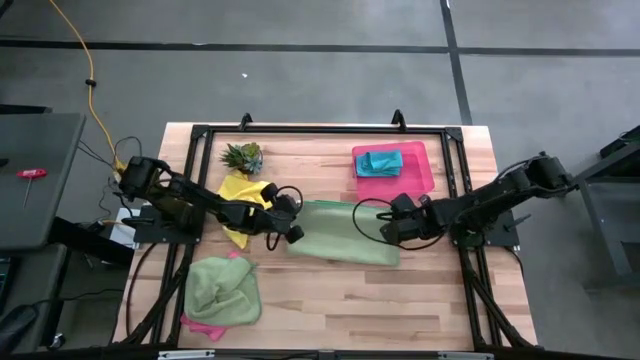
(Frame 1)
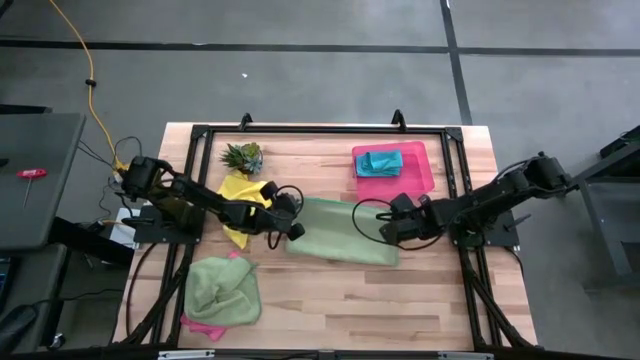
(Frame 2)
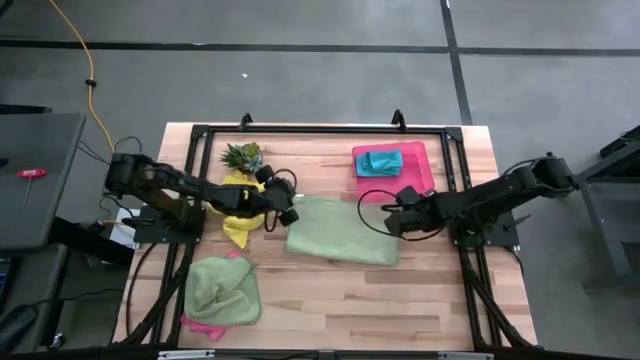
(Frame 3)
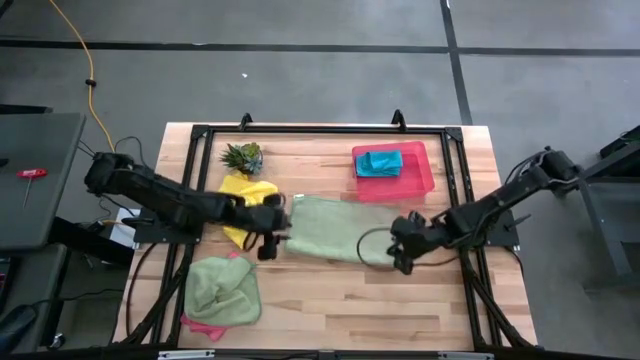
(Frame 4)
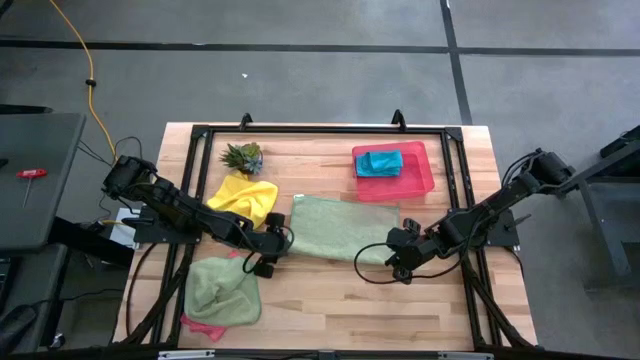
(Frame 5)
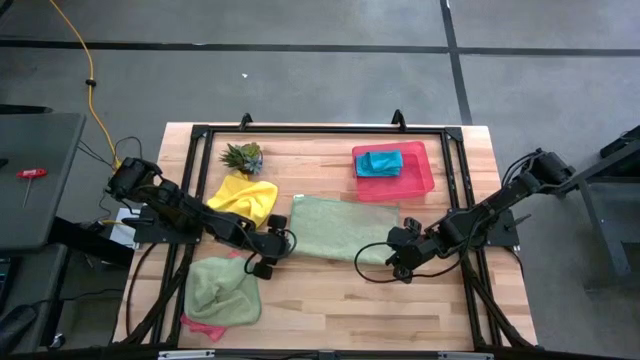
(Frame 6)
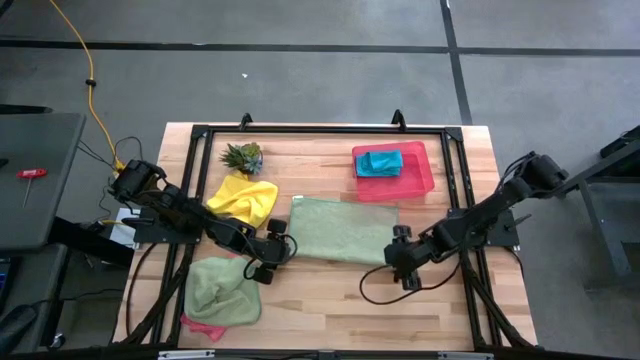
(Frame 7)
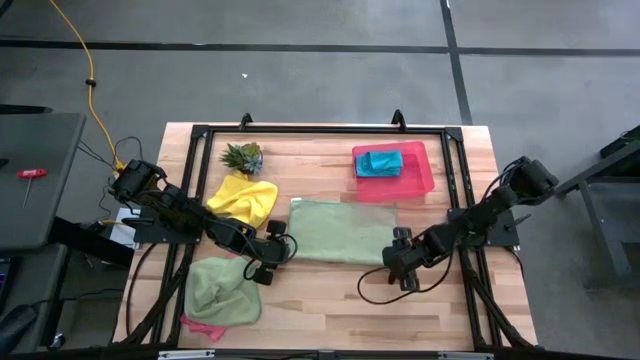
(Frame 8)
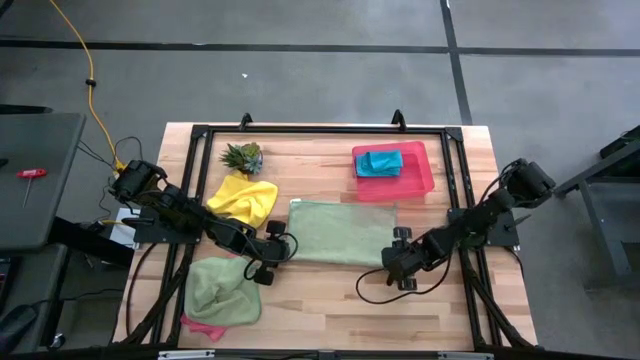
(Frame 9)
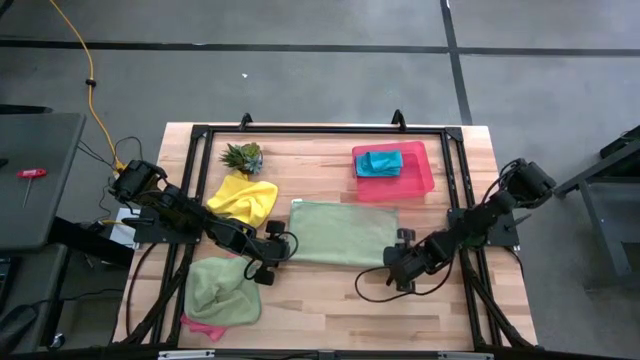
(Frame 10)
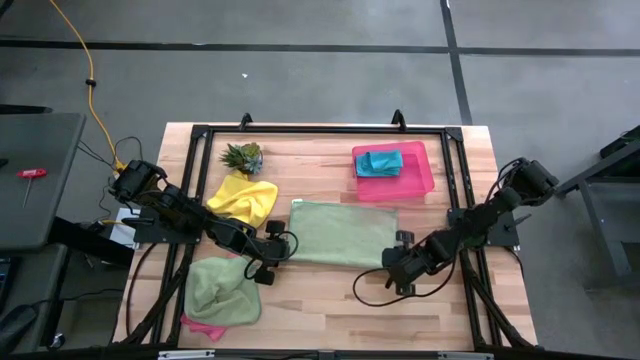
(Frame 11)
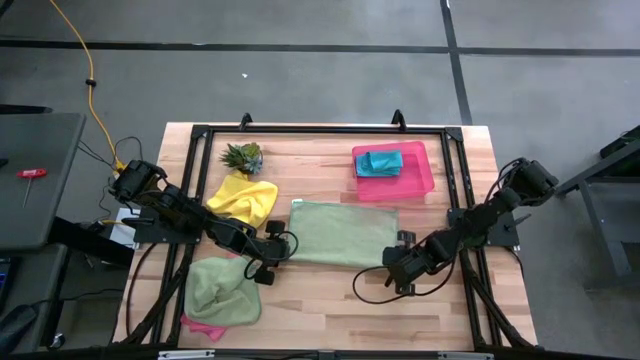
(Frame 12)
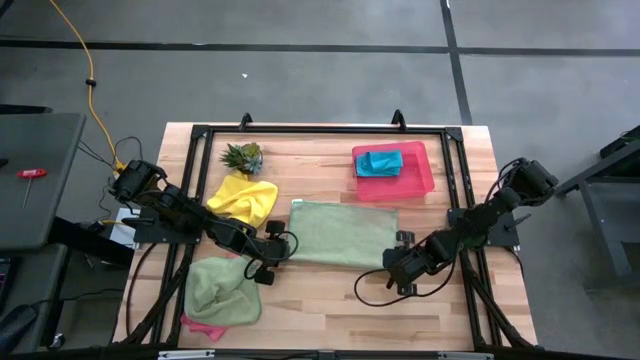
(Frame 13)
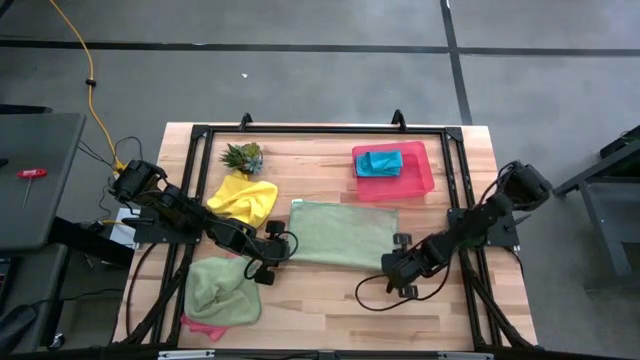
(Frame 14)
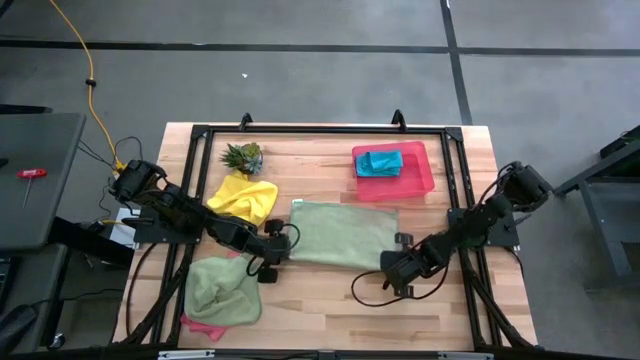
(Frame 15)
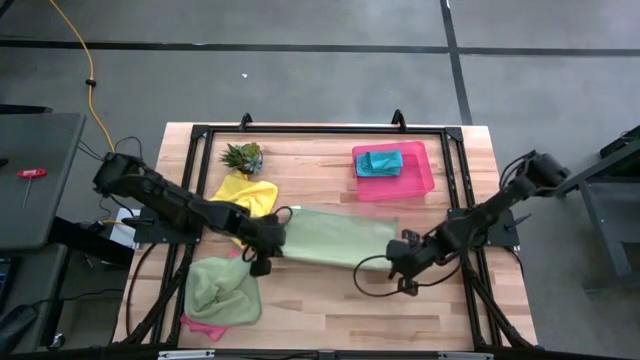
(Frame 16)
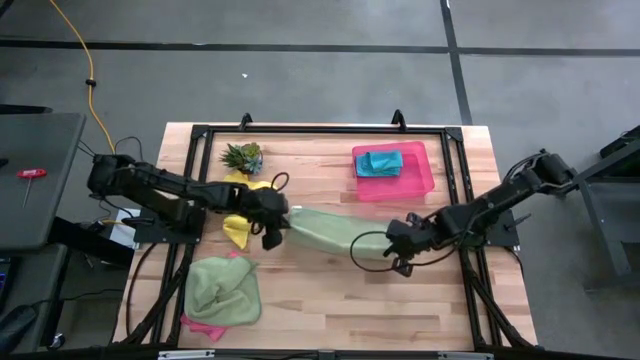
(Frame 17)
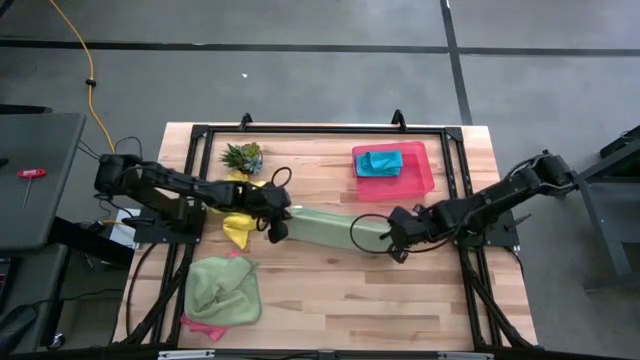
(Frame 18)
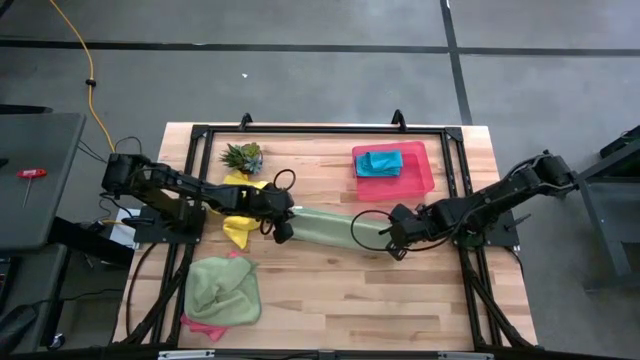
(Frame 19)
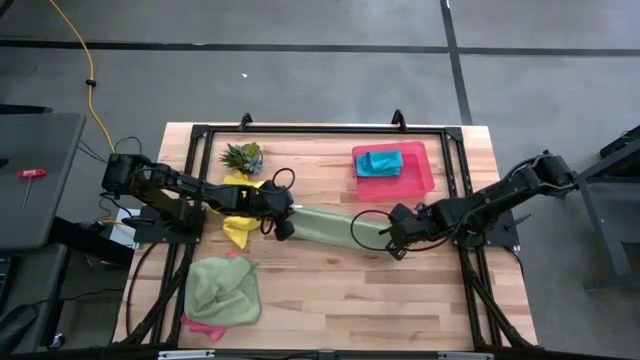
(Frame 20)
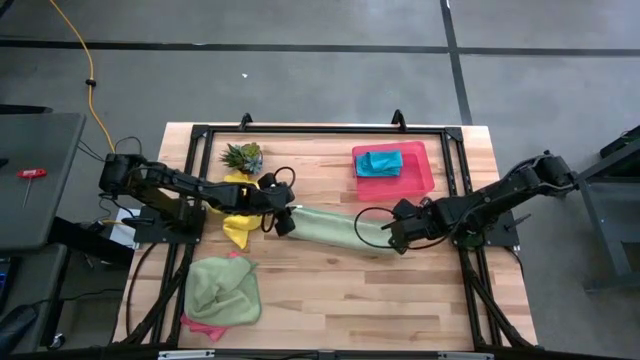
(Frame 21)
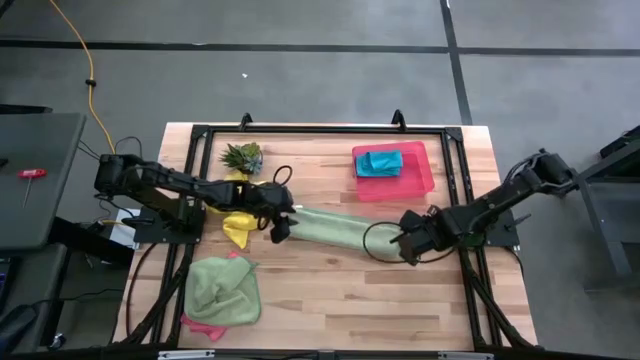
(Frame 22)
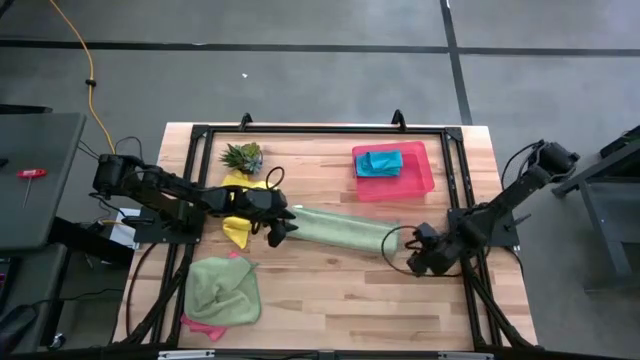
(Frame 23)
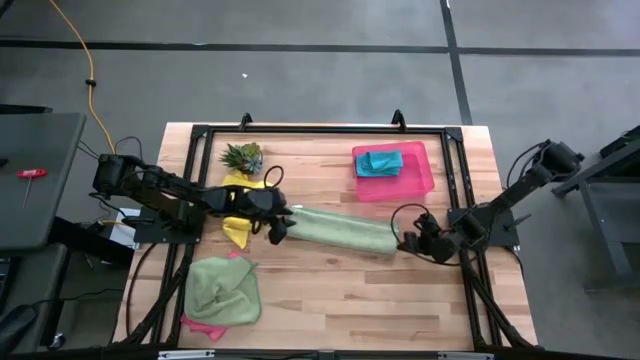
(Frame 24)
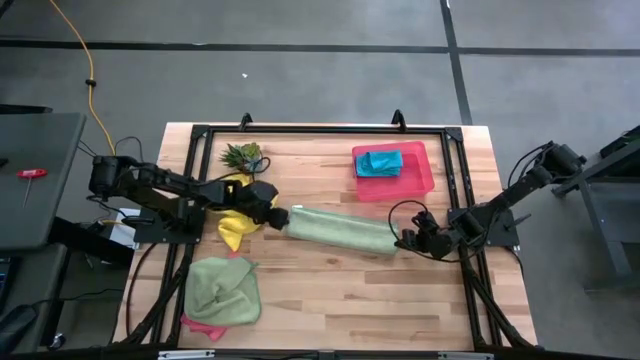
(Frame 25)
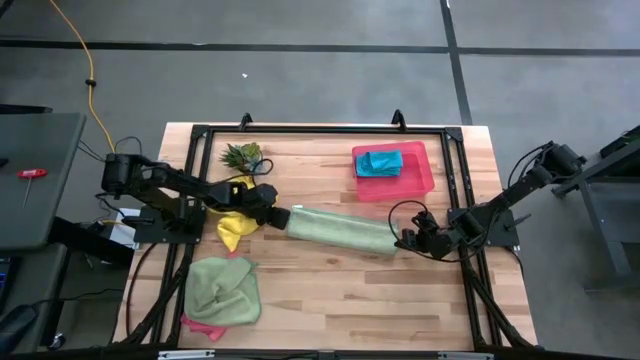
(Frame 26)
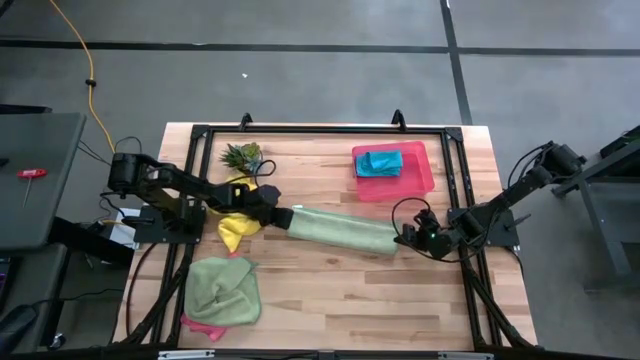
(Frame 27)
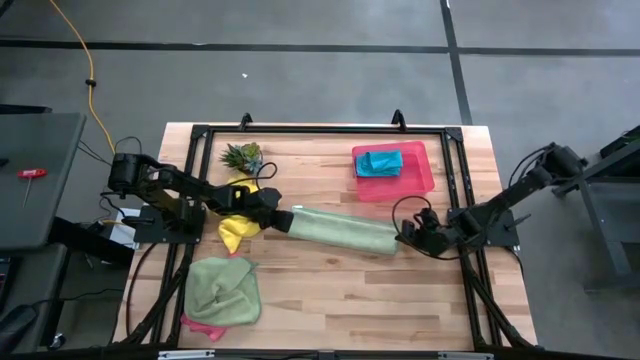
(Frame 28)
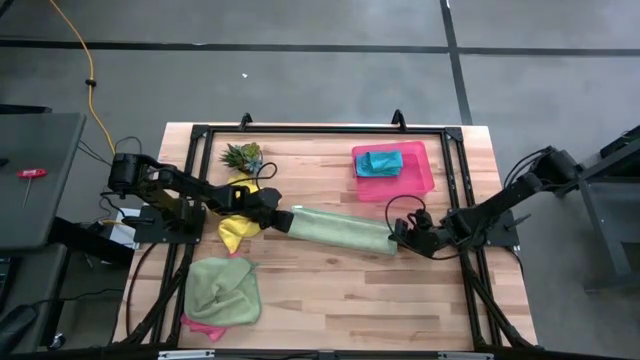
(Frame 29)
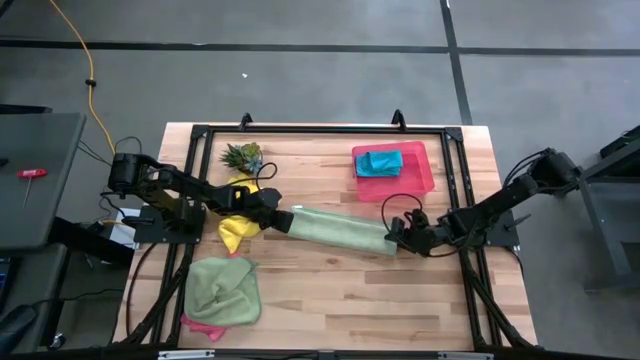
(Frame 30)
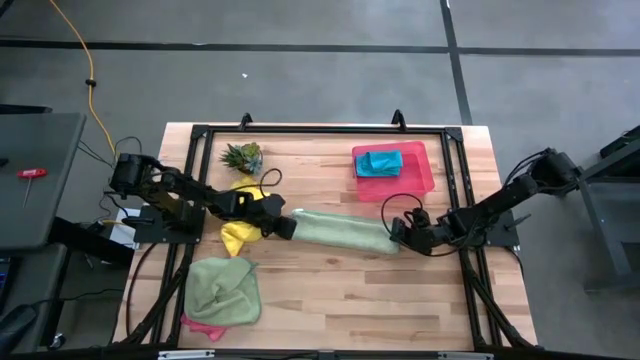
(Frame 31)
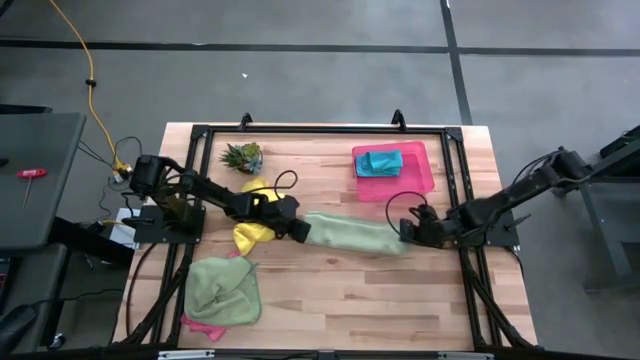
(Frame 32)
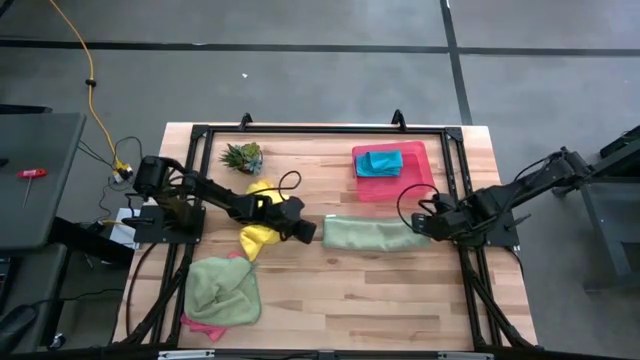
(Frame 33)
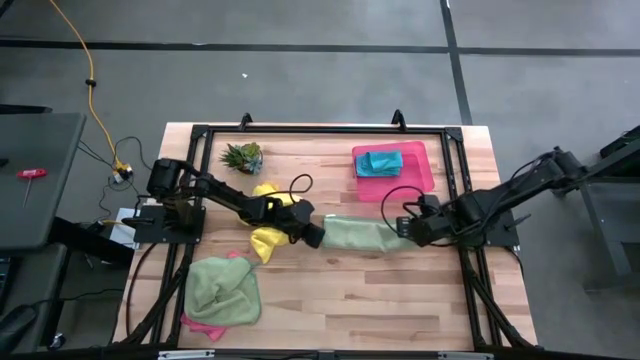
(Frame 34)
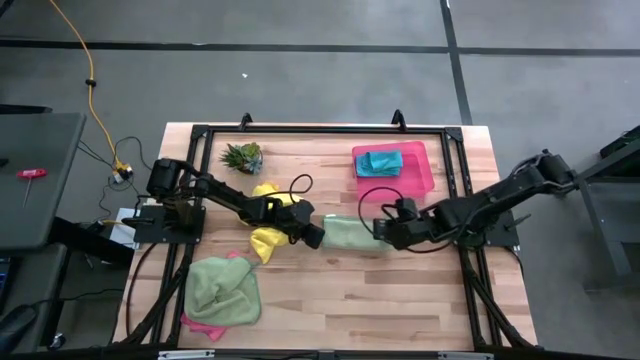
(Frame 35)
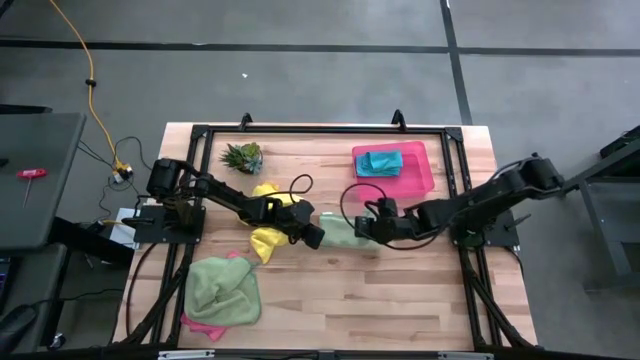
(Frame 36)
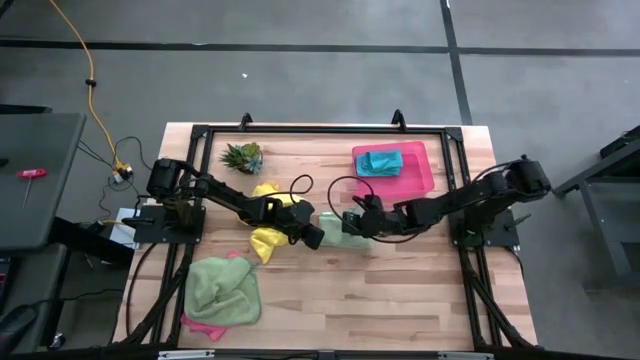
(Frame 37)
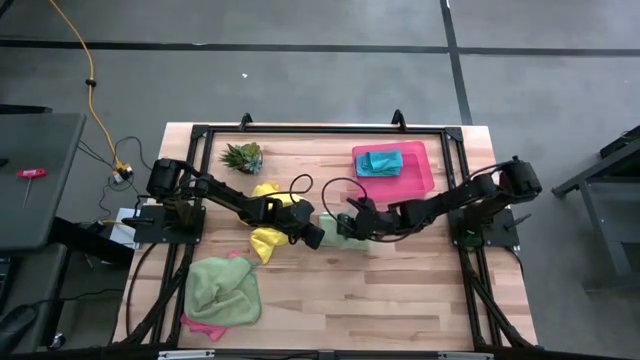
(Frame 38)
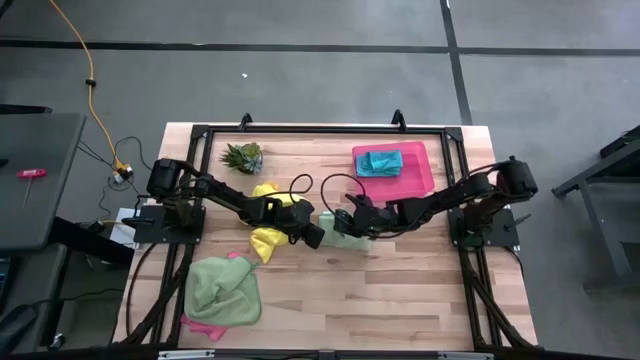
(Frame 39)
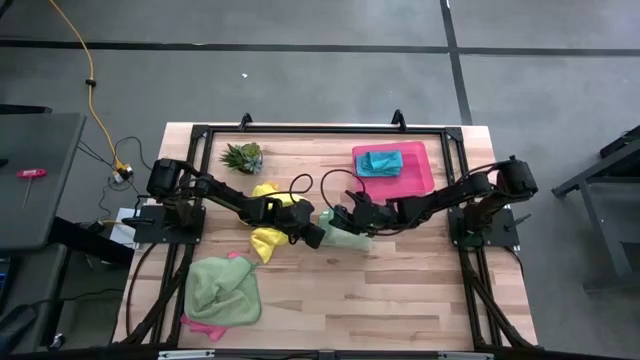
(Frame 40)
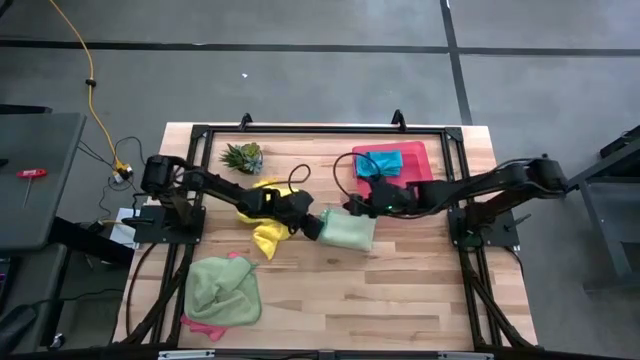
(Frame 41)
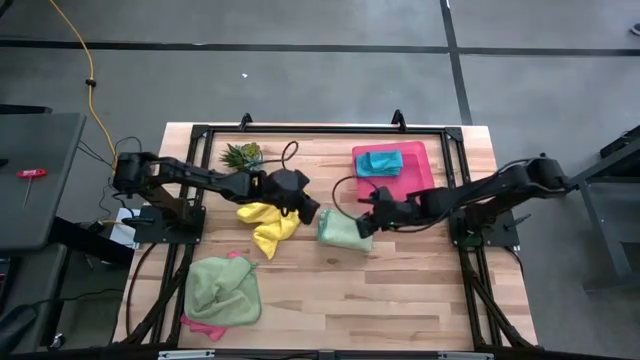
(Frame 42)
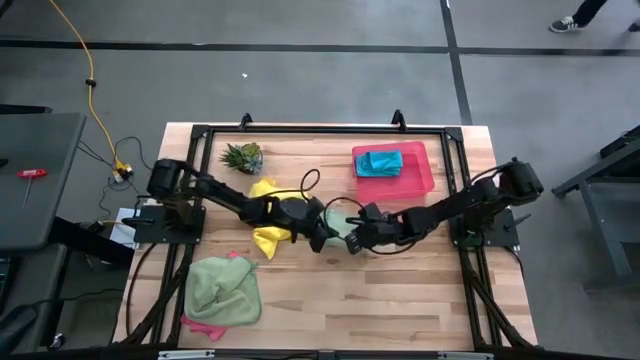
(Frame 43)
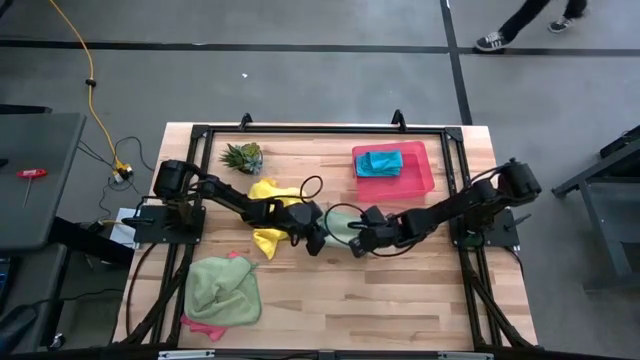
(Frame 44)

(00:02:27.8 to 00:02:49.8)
Task: Fold microfiber towels
Fold the right green microfiber cloth
